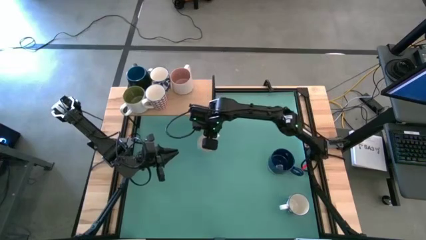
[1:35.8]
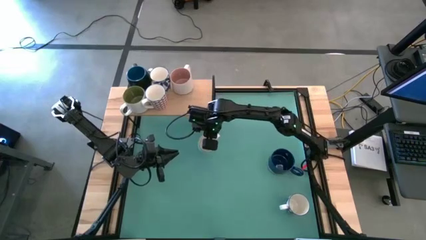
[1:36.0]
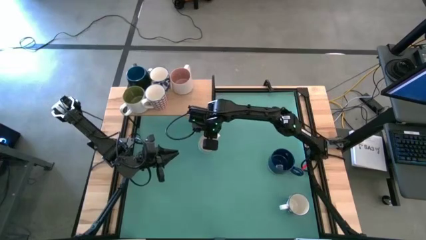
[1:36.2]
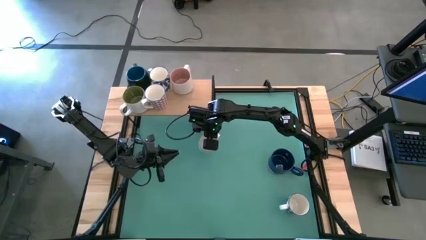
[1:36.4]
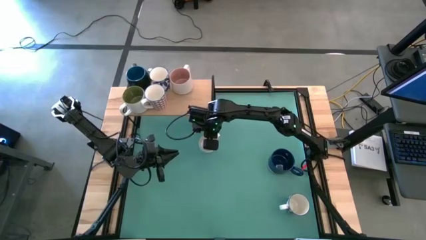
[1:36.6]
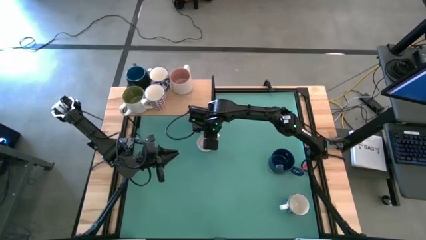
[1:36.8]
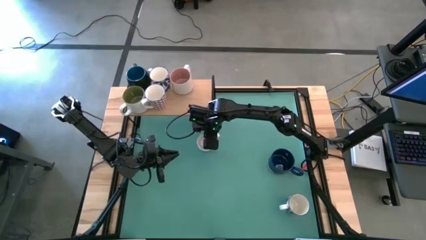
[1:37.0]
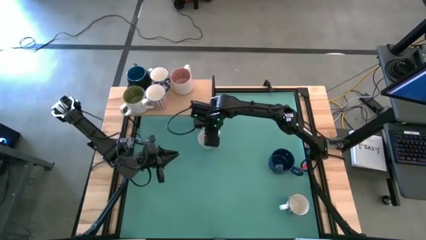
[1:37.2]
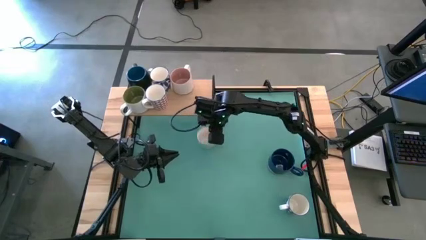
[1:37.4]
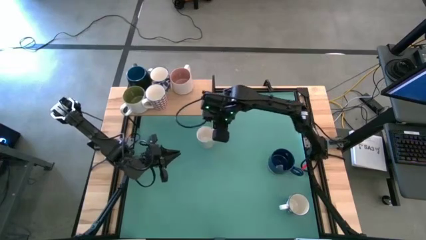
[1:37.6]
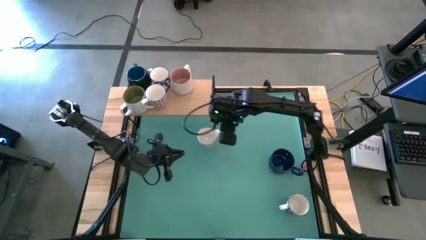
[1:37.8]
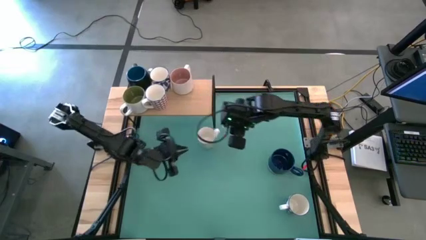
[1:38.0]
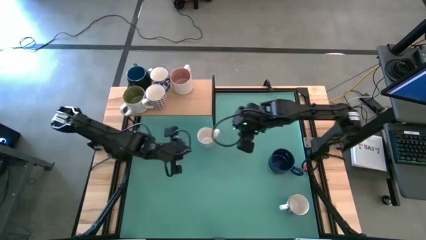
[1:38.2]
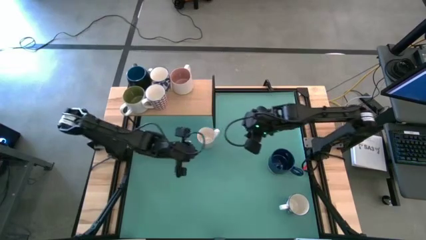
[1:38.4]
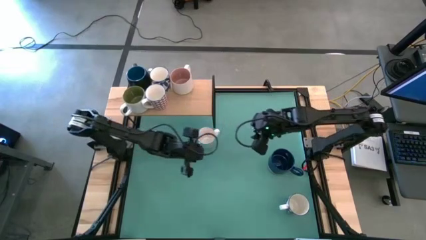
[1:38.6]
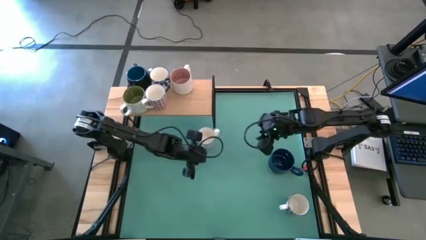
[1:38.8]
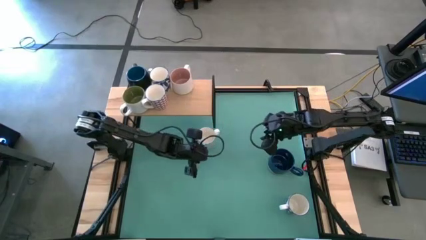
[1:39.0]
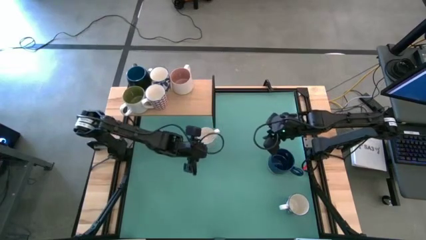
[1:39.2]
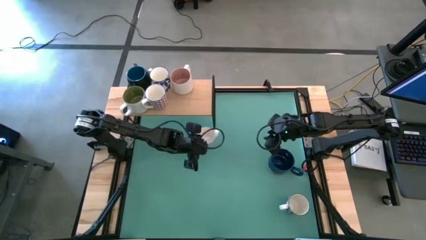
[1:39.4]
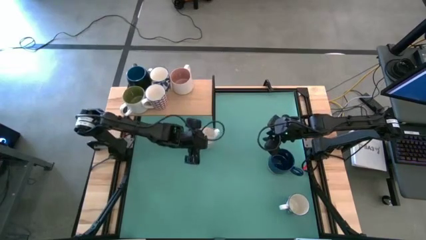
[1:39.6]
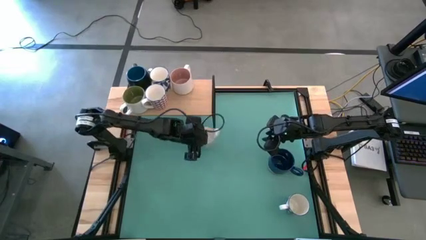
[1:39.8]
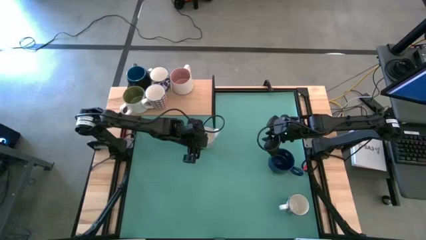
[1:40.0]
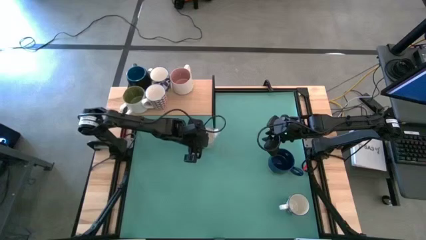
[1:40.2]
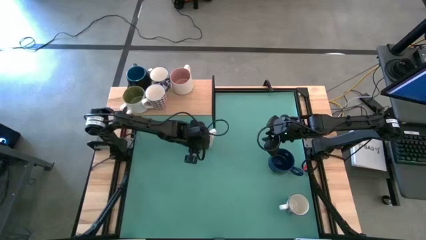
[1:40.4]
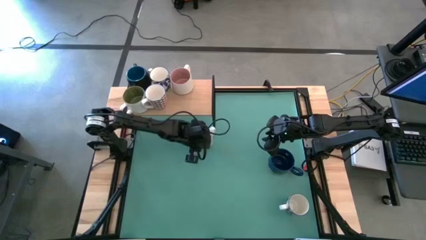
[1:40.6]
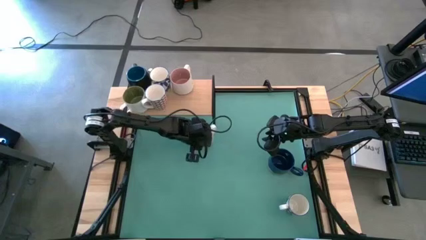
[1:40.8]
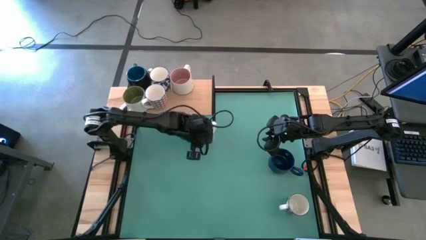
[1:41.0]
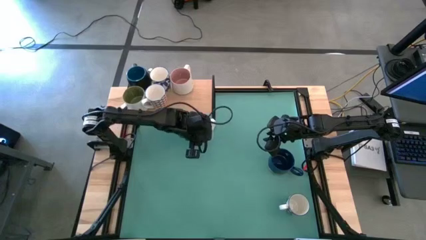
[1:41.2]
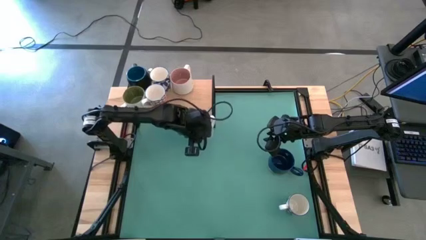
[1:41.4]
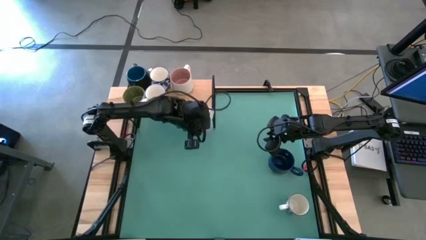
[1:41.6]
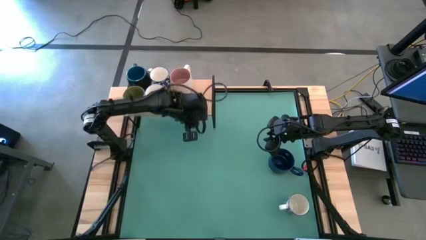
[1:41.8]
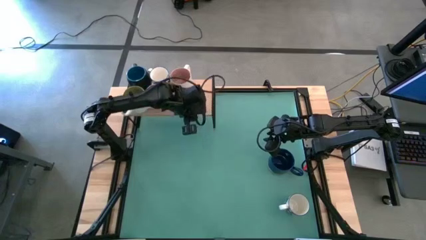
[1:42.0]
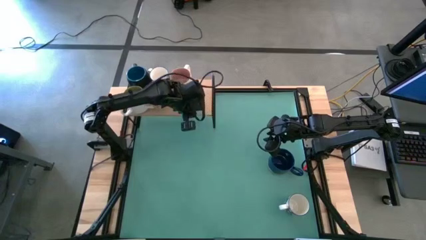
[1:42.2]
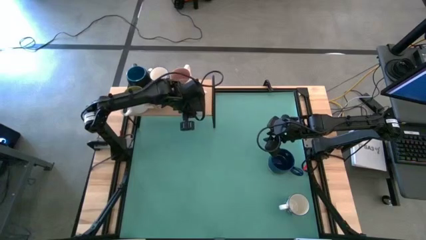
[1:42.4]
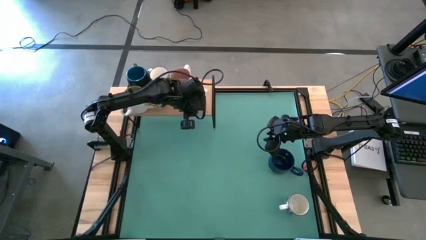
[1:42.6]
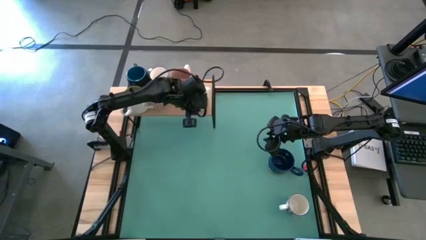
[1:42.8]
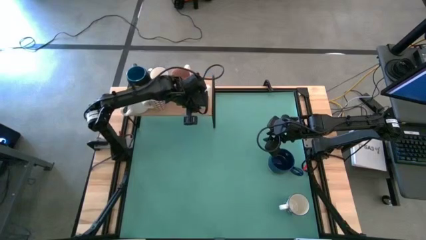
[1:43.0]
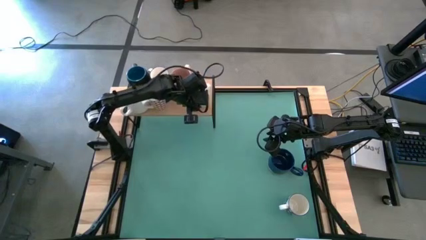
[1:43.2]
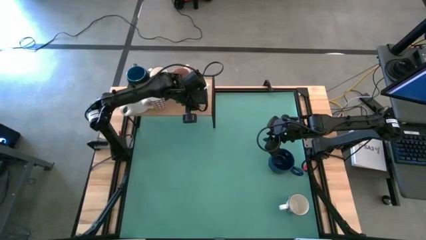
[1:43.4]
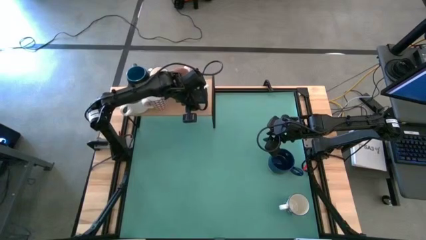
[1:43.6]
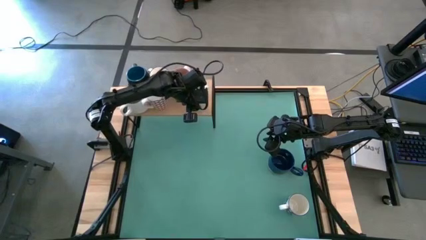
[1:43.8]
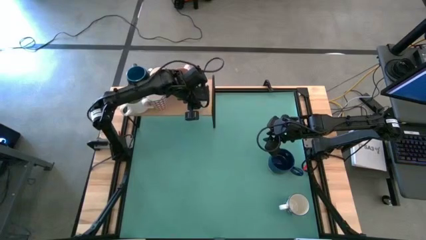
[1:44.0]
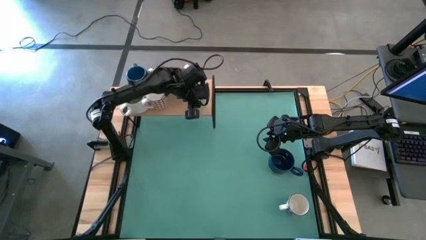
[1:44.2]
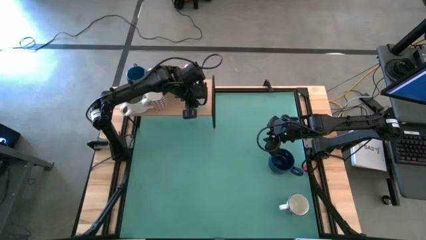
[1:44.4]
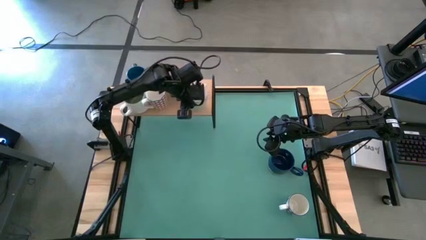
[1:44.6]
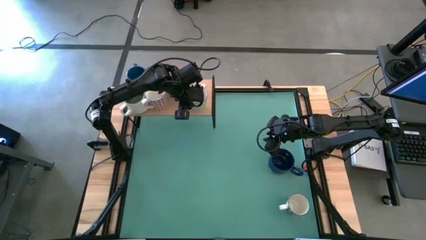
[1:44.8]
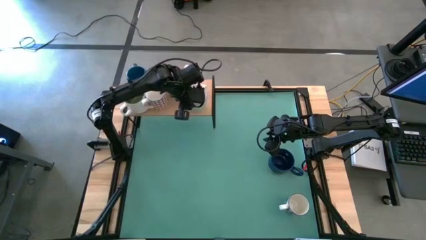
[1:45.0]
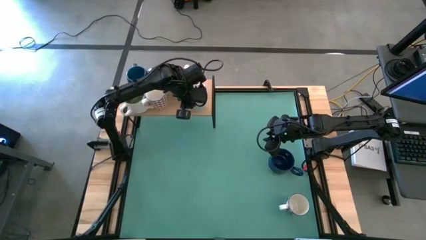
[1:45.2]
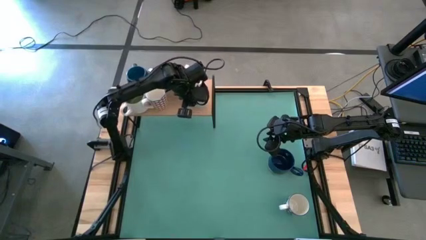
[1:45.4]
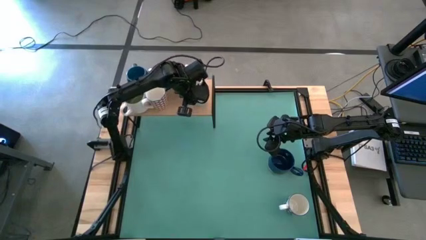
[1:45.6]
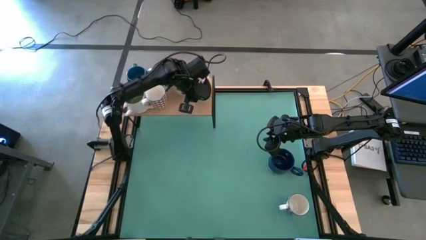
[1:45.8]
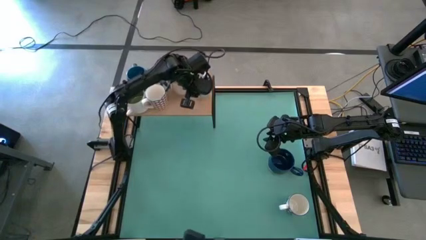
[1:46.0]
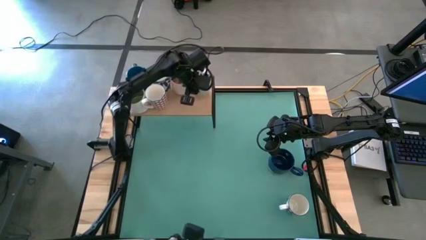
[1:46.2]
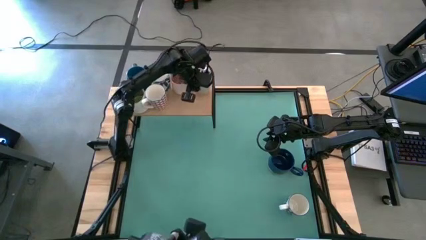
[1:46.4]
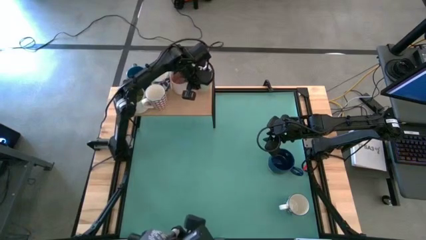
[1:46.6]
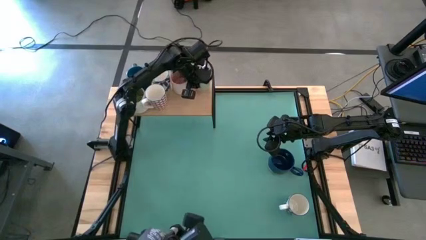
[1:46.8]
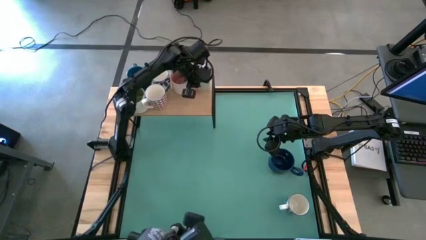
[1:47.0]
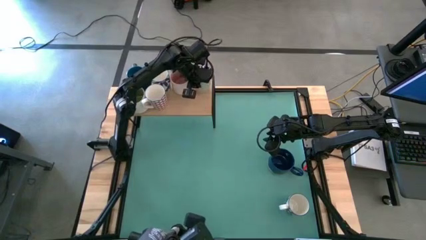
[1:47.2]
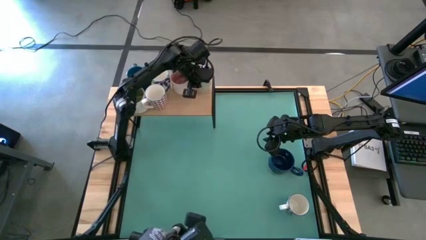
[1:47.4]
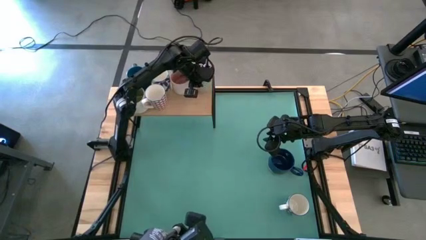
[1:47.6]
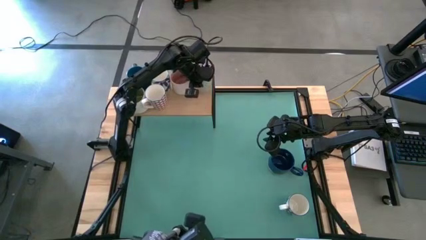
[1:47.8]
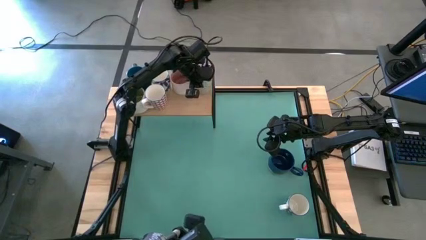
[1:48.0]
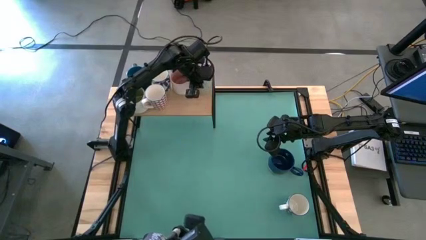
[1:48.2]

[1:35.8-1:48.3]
Task: Place coffee mugs
Put the white gray patterned mug on the shelf

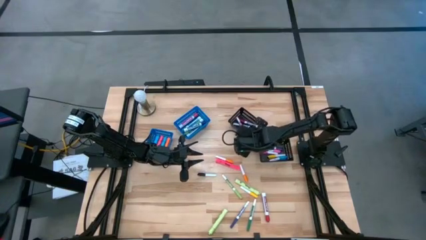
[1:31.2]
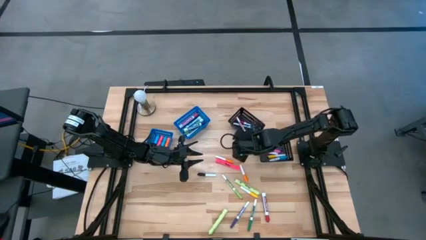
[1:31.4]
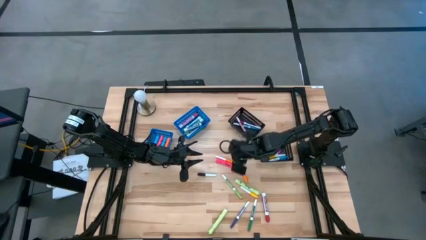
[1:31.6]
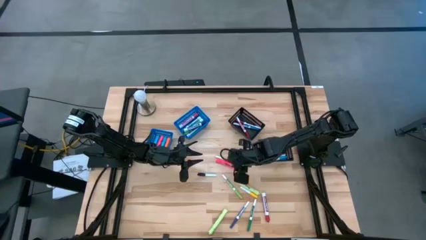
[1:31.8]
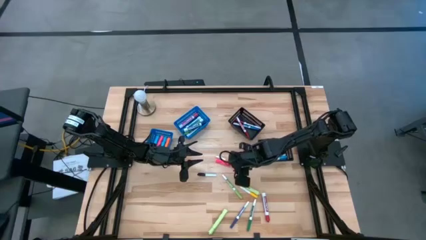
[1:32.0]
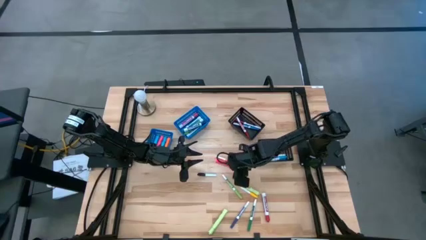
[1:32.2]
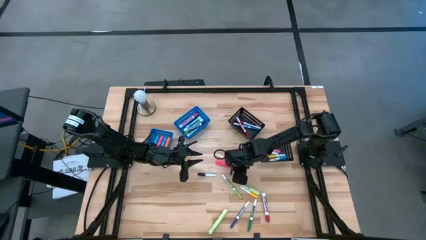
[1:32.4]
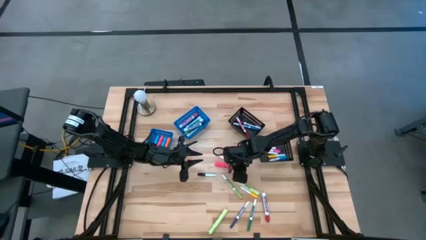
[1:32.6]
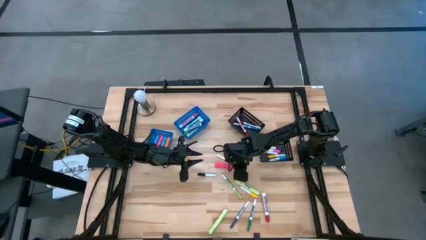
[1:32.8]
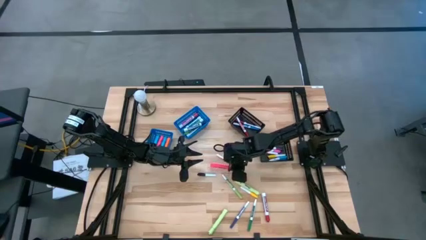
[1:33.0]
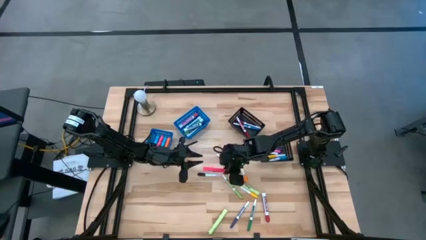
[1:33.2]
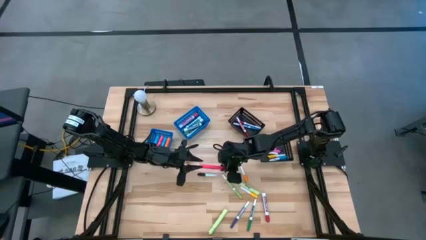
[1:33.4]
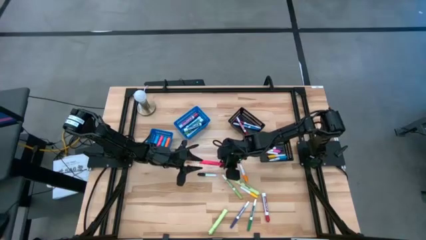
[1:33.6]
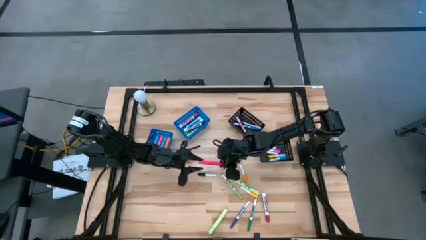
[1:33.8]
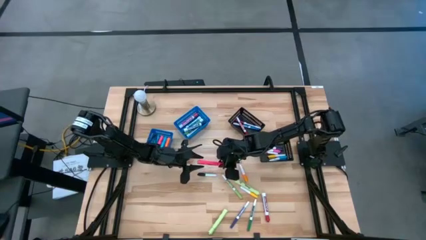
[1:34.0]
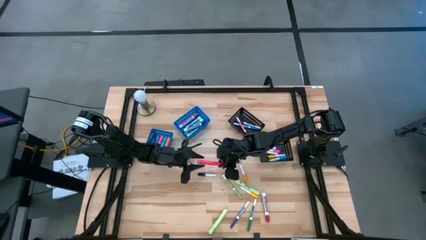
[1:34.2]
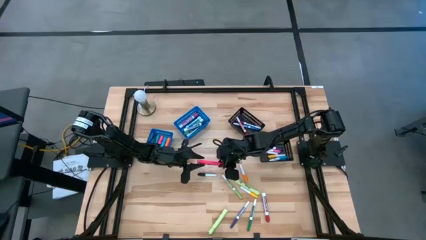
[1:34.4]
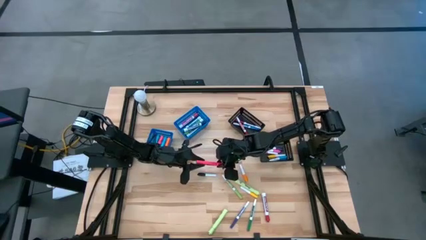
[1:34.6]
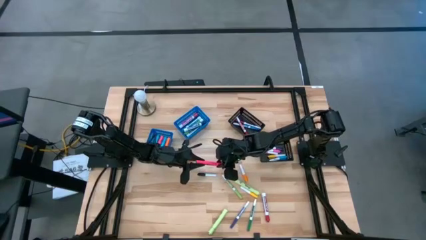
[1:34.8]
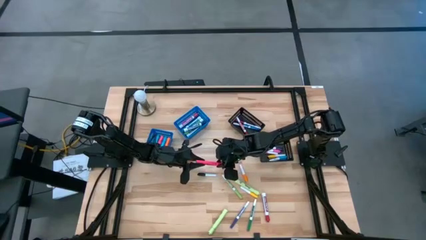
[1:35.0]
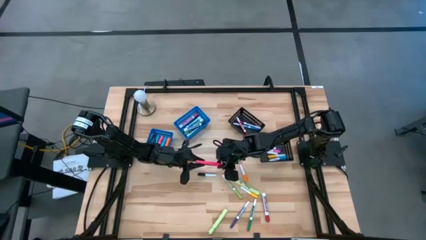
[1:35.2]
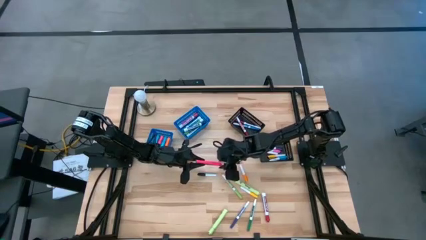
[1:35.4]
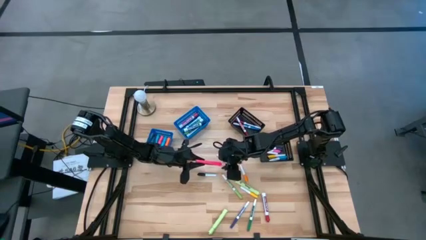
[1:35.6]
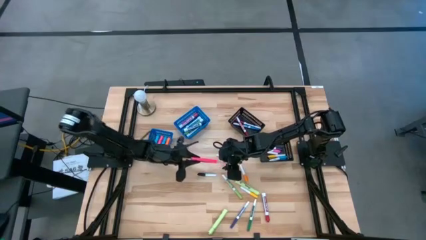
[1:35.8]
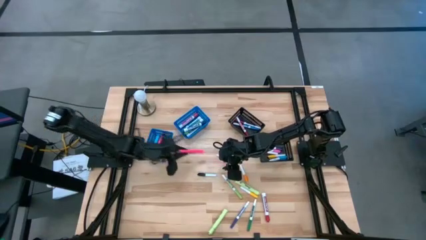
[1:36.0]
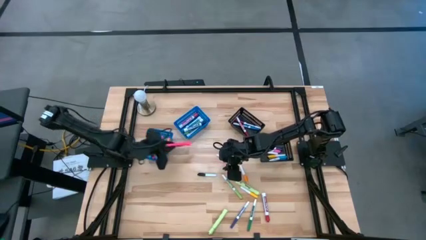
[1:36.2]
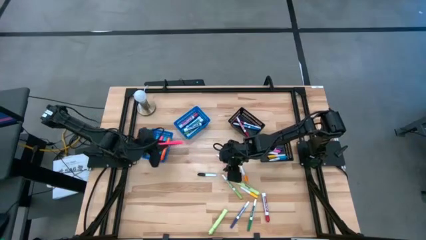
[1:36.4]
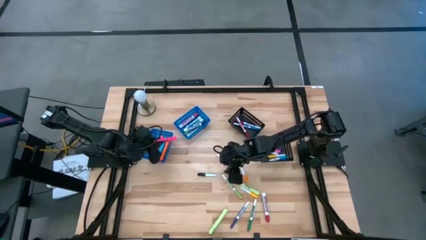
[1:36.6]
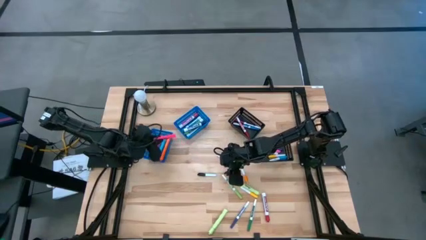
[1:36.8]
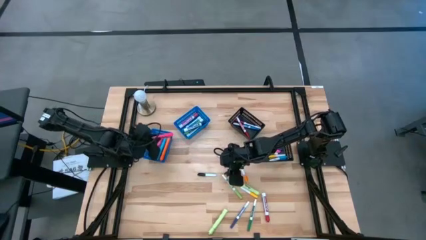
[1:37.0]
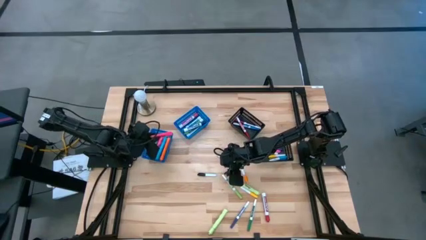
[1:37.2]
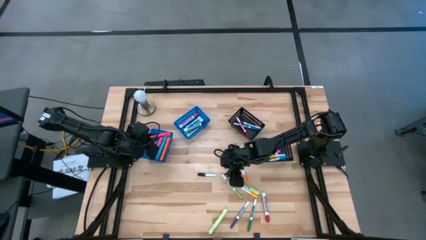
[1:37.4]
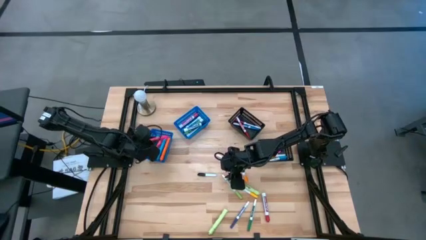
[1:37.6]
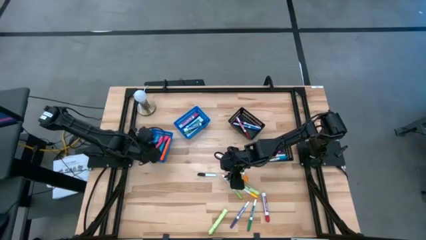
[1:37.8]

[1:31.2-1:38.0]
Task: Pick & Place Markers
Put the pink highlighter pen into the left blue bin
